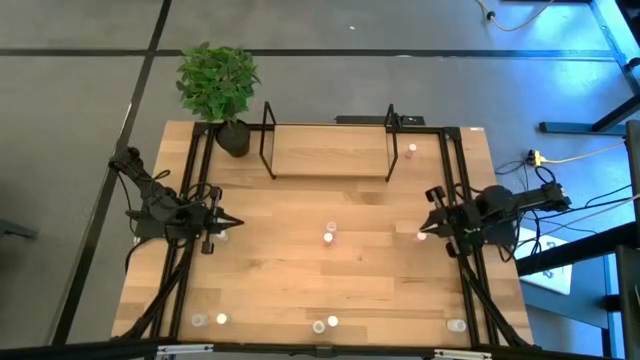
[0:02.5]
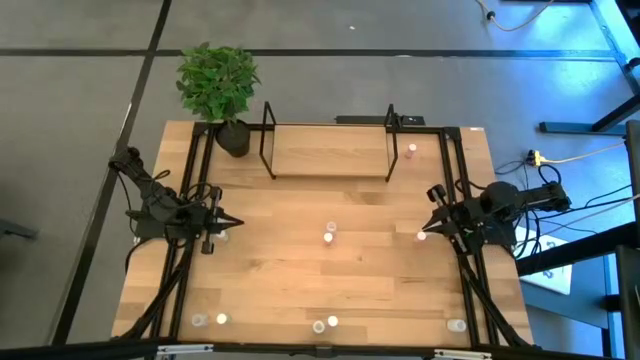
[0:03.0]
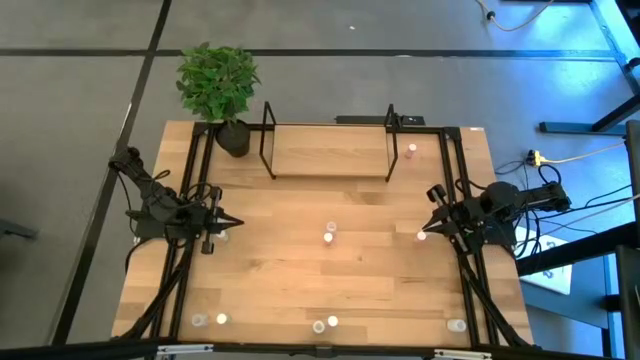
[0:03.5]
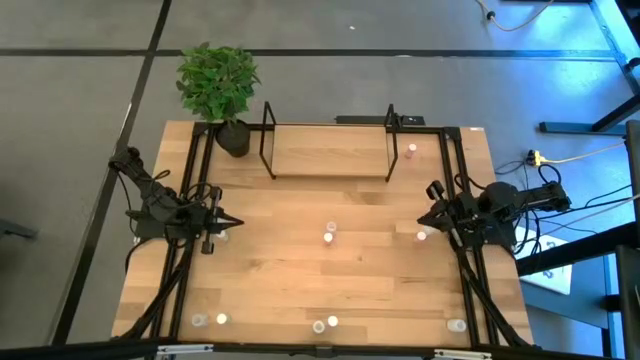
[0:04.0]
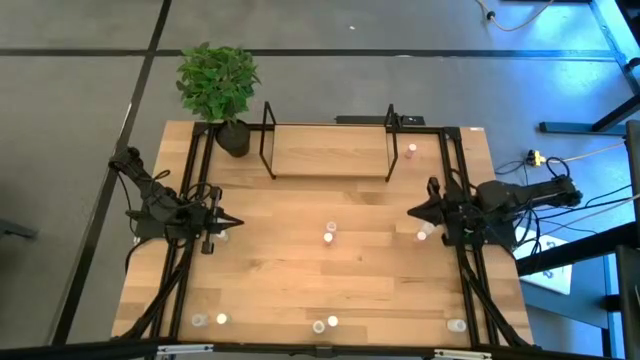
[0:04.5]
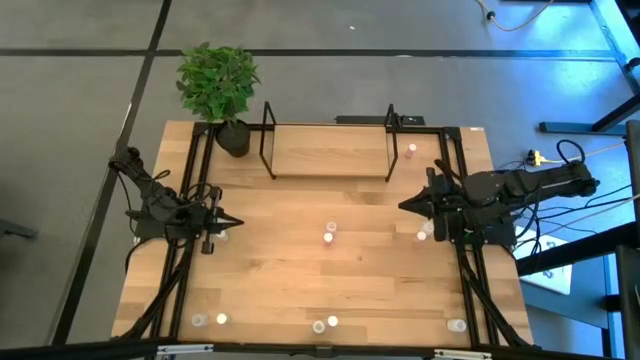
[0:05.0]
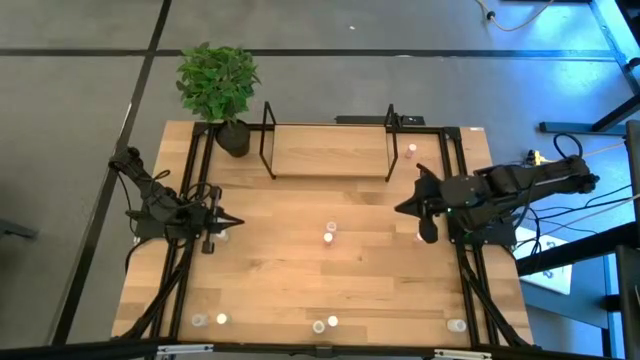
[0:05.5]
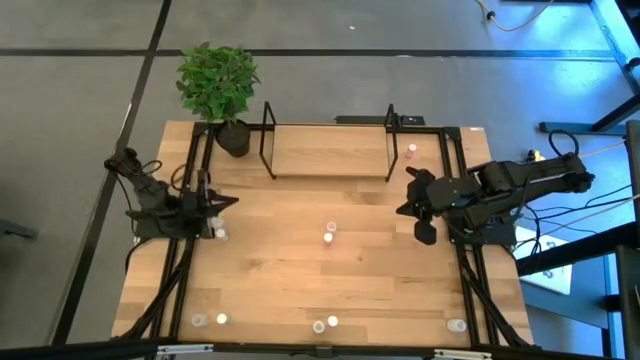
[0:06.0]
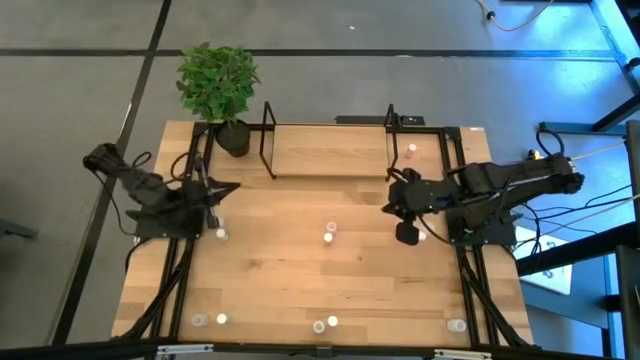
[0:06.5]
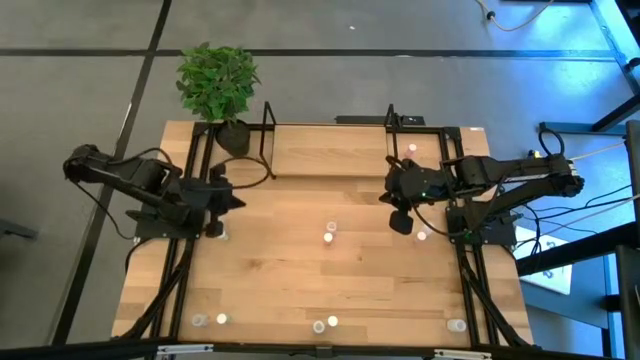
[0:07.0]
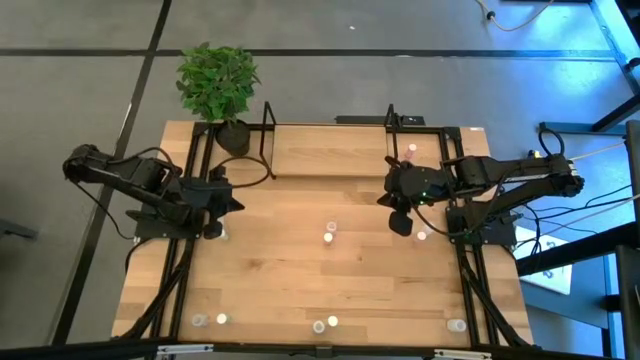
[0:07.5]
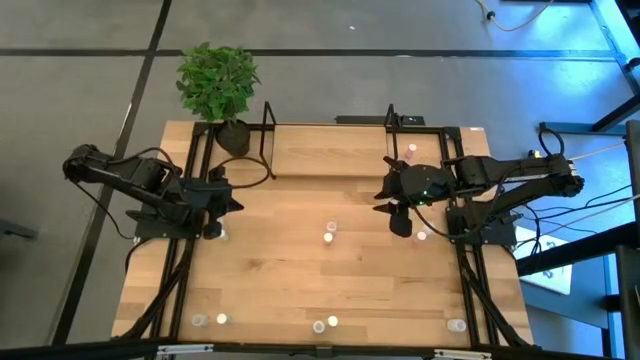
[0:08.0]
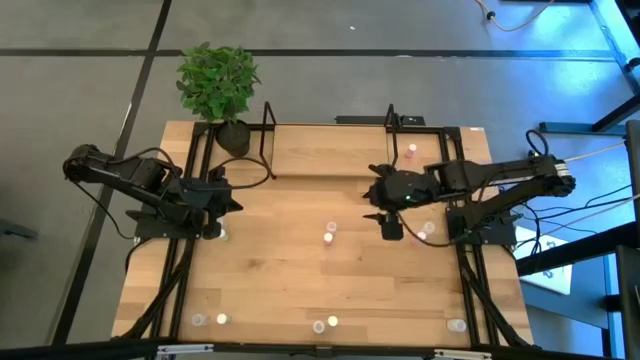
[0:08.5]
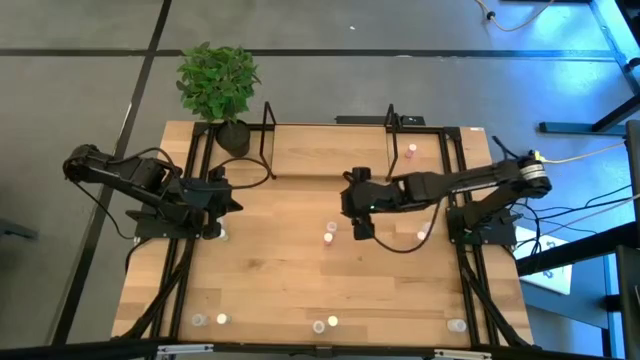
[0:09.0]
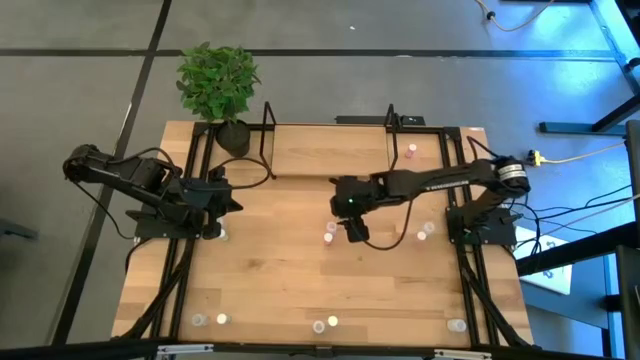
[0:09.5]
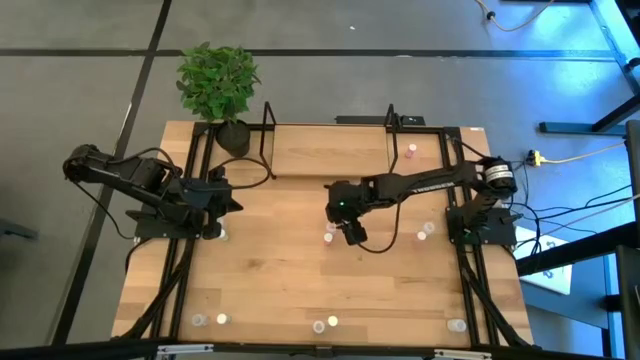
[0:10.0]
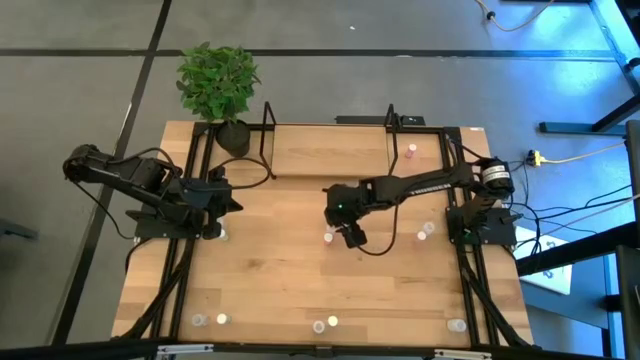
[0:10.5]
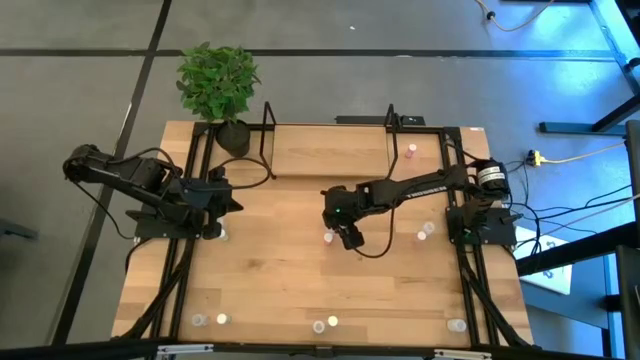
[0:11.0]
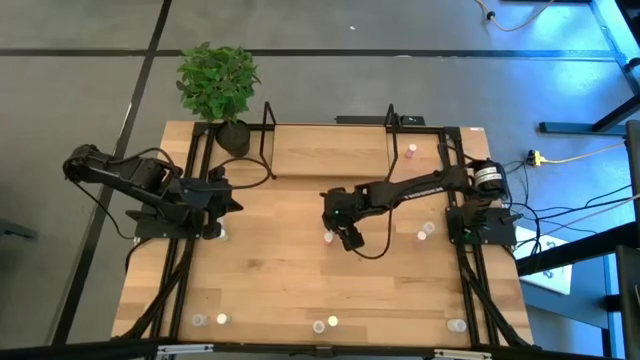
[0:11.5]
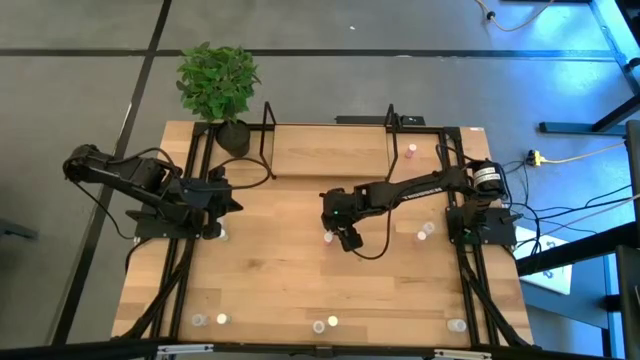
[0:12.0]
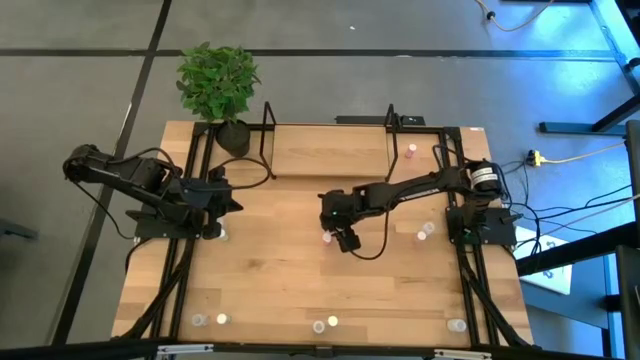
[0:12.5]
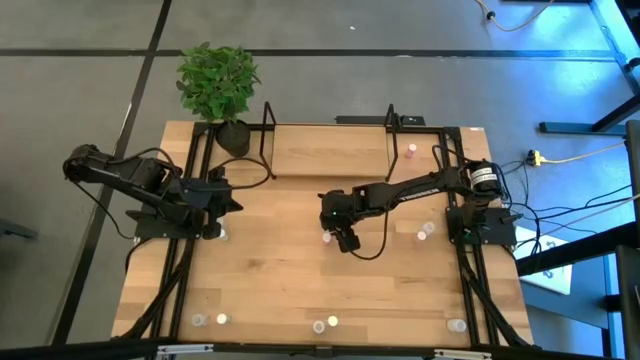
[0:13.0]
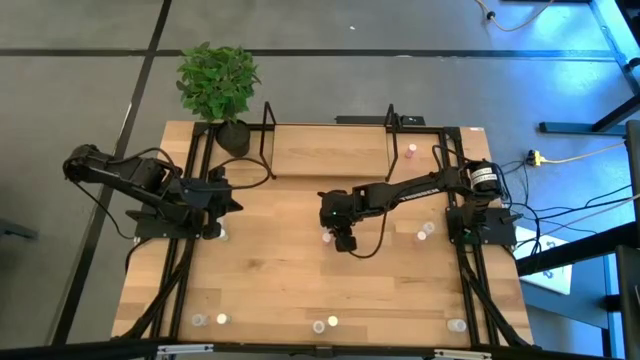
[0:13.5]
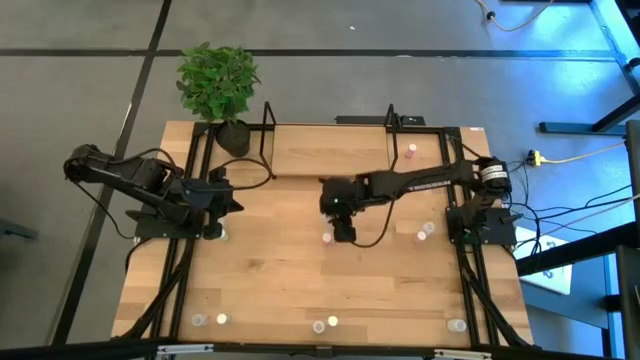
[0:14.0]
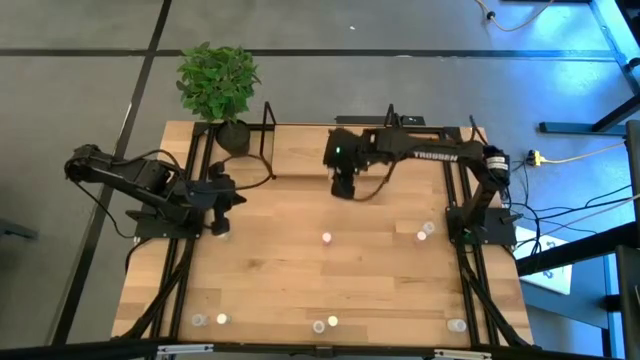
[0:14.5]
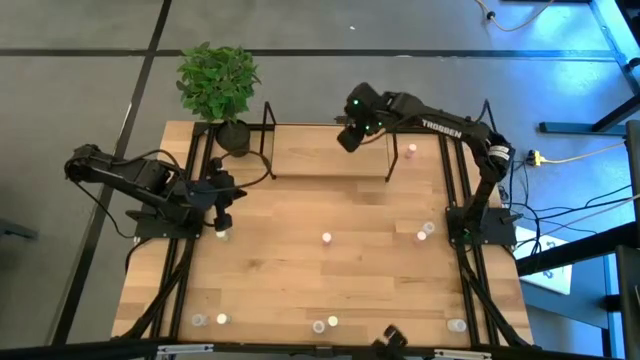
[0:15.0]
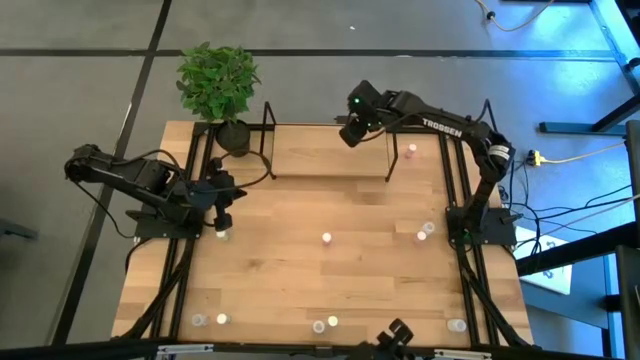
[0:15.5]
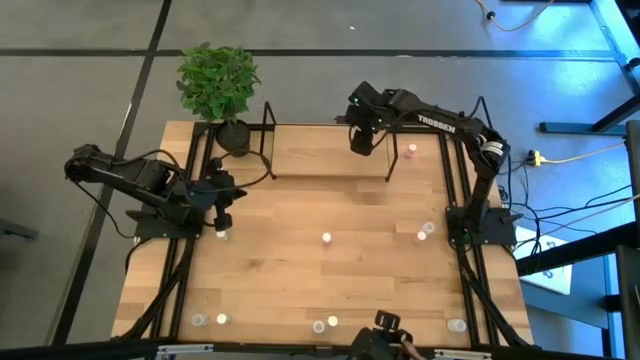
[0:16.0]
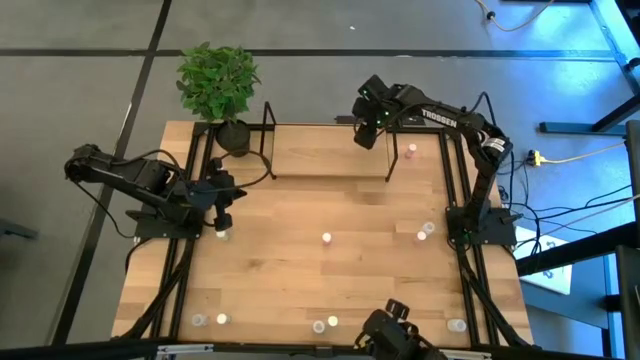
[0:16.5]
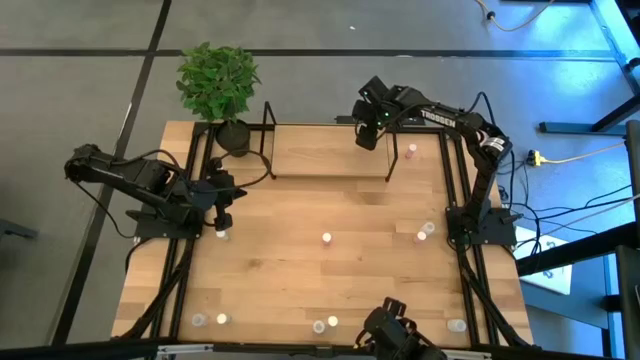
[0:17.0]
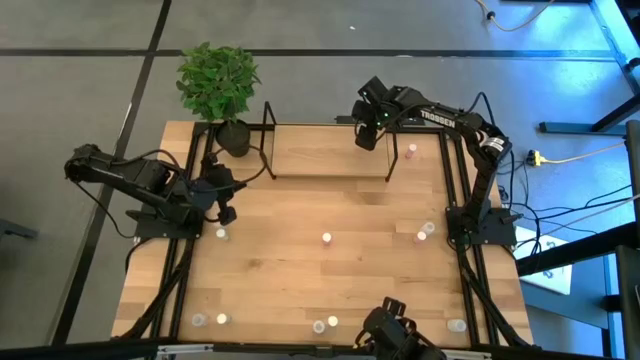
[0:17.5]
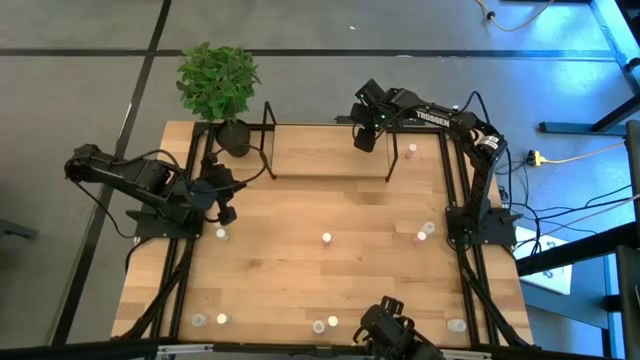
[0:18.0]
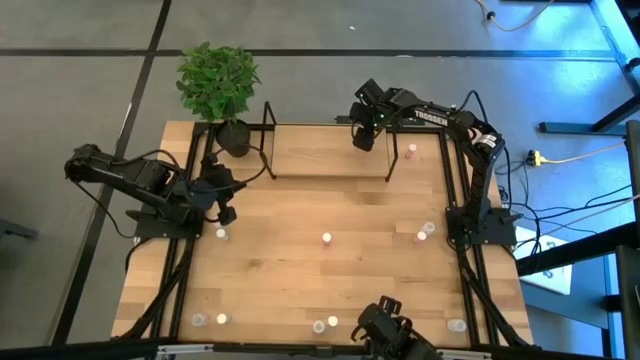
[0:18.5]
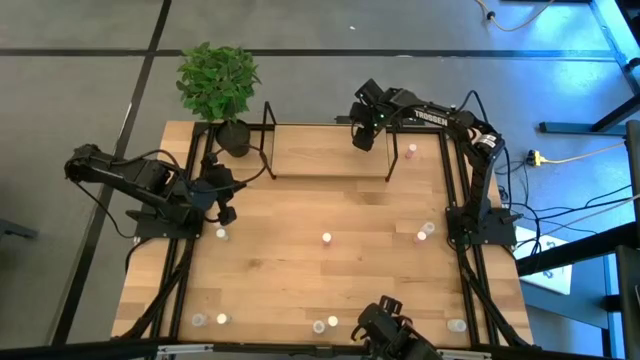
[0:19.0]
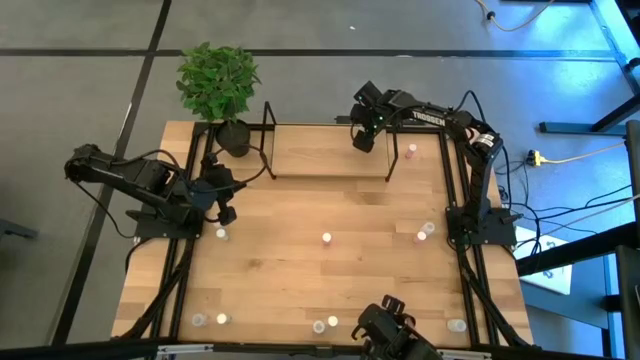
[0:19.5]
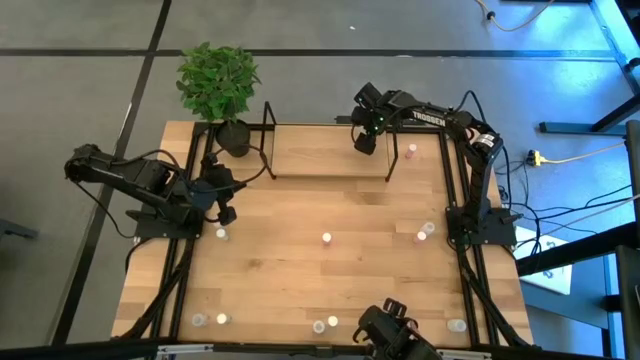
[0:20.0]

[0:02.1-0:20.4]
Task: Pick and place medicine bottles onto shelf by color
Put the top right transparent medicine bottle on the shelf

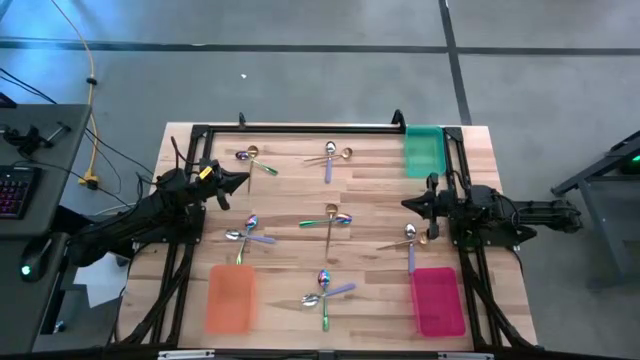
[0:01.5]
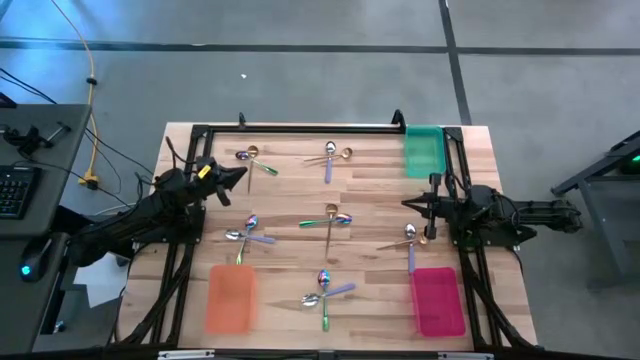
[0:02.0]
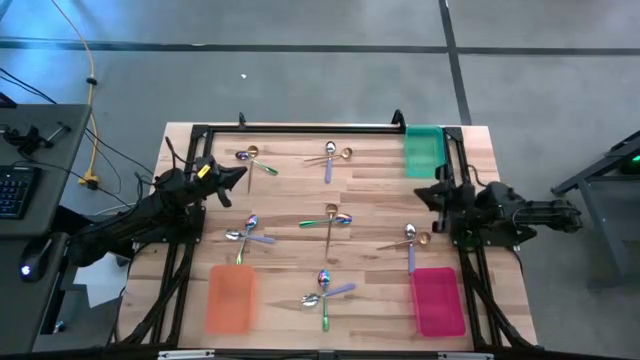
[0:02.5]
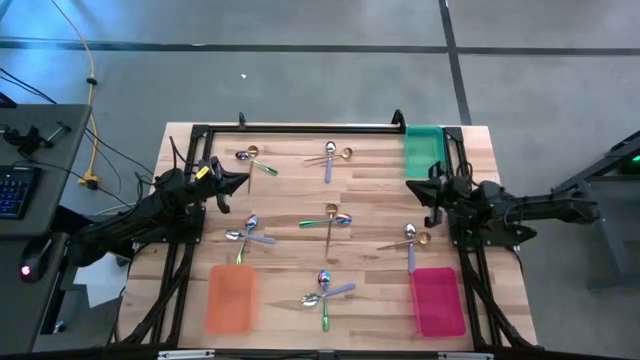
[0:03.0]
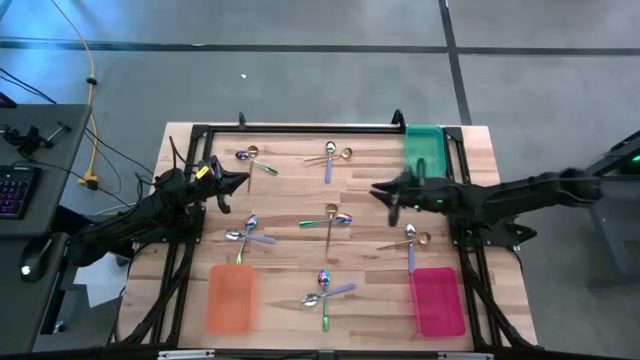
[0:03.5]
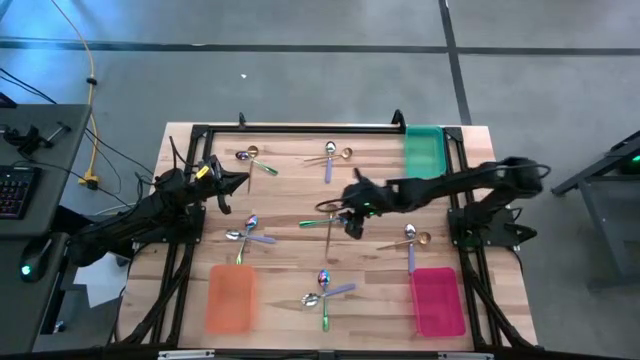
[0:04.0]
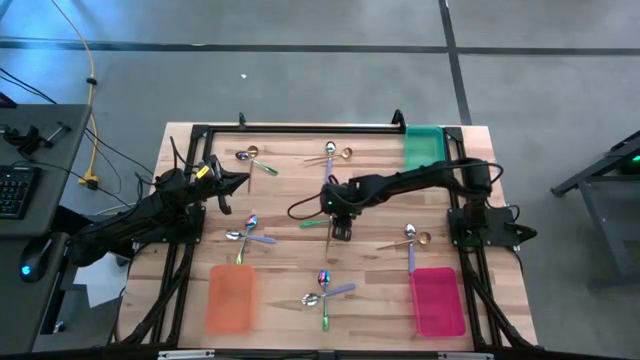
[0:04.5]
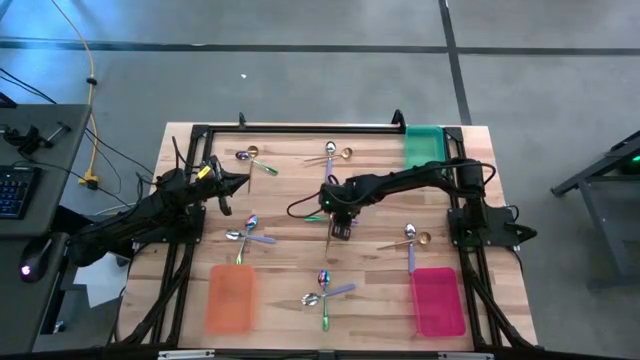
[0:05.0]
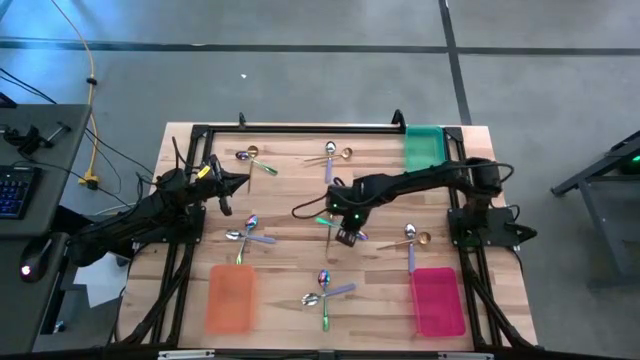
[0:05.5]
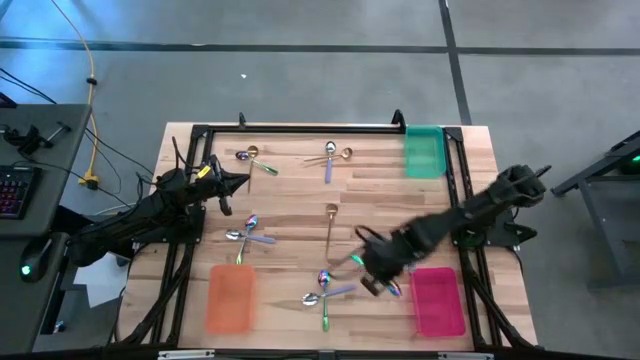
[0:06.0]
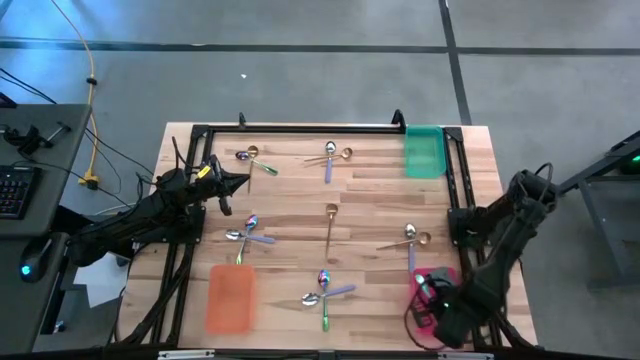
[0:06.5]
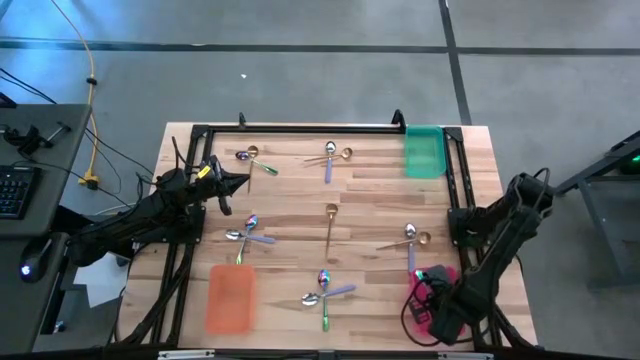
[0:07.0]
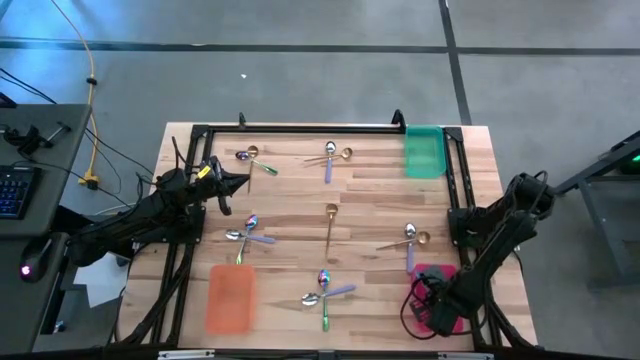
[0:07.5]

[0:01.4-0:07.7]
Task: Sort silverware by color (type)
Put the blue spoon into the red bin
